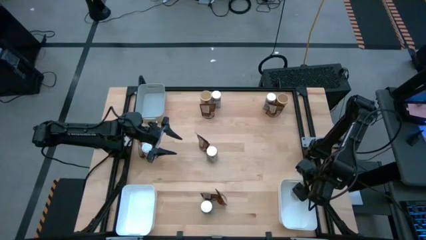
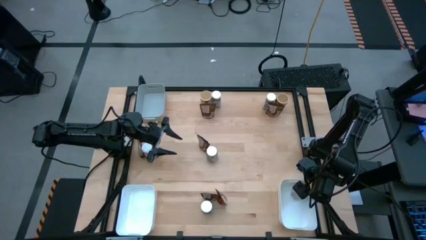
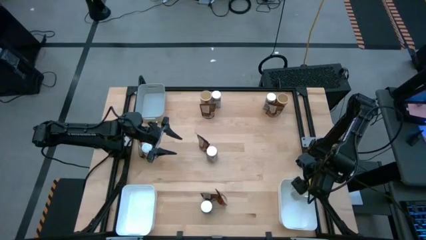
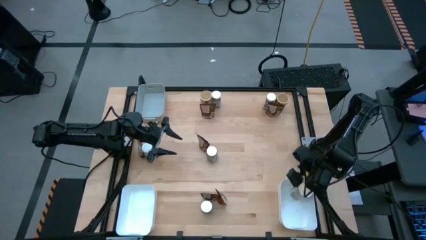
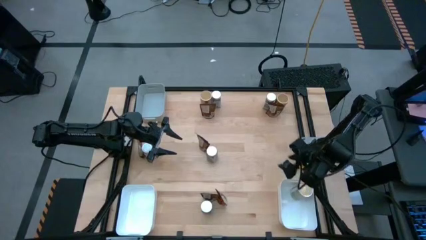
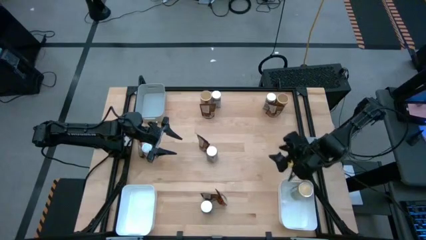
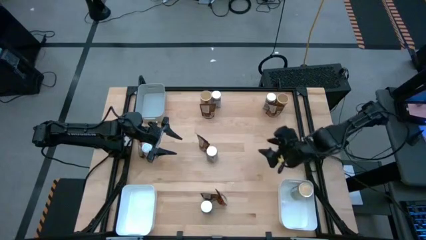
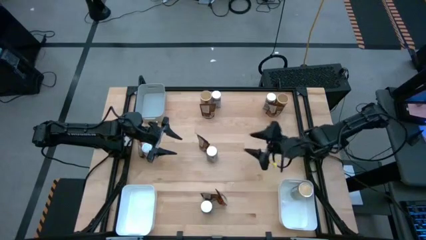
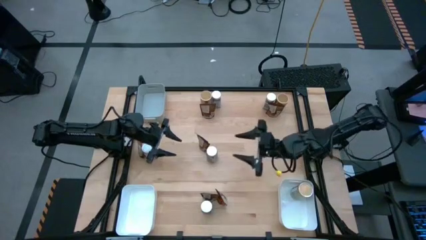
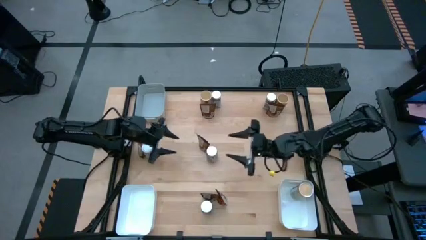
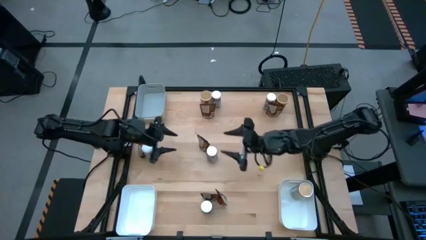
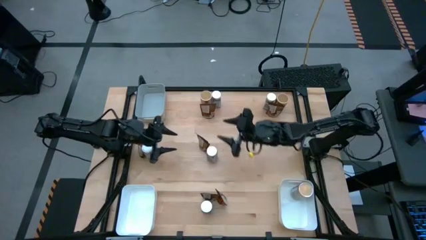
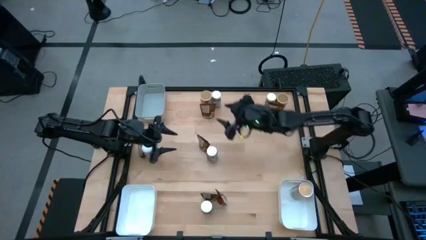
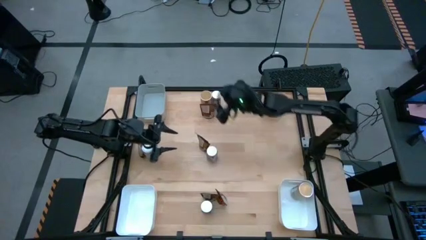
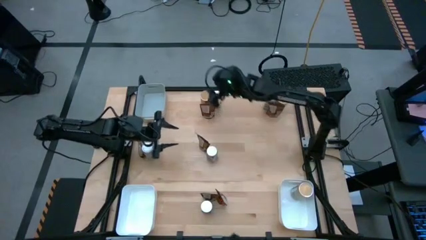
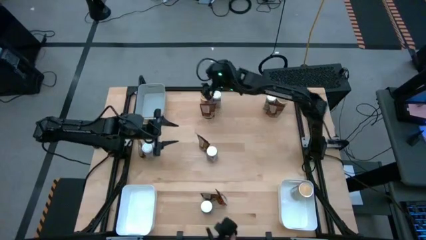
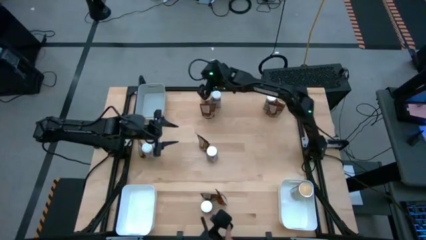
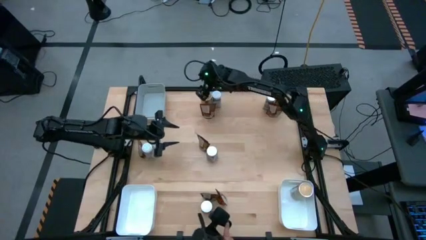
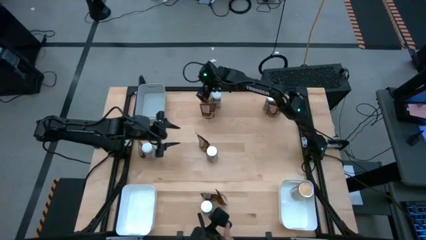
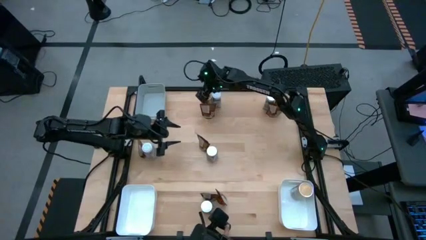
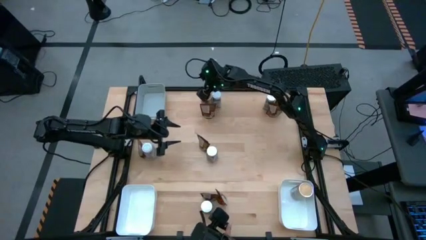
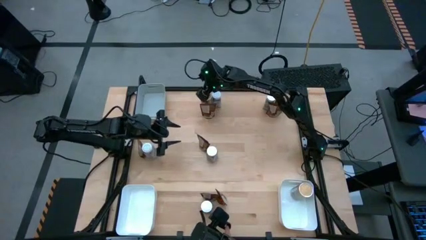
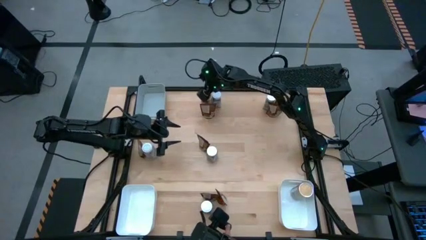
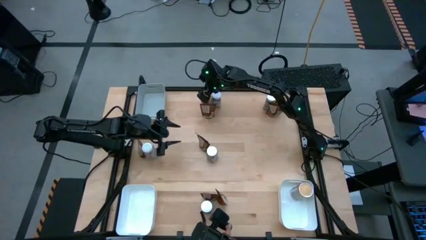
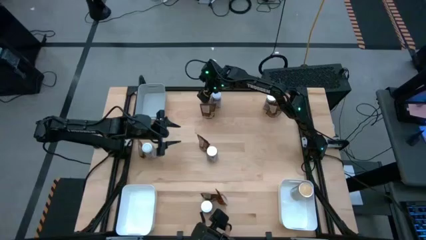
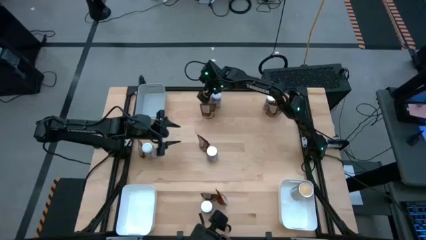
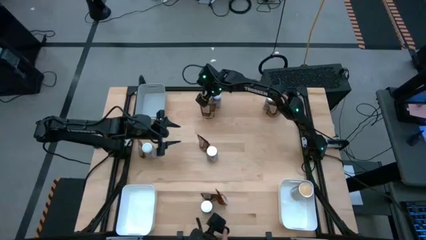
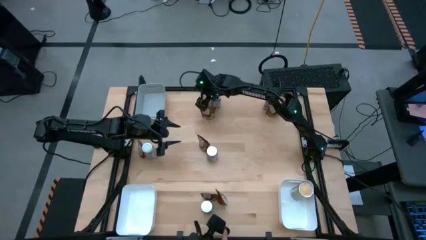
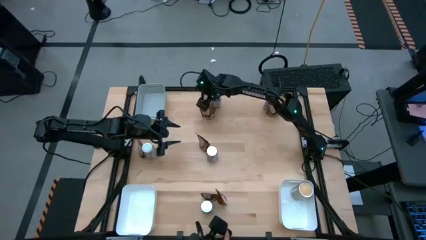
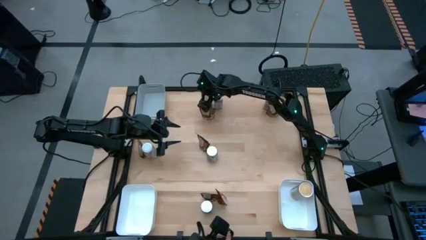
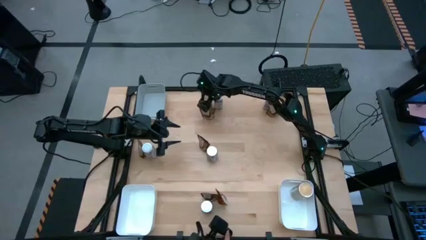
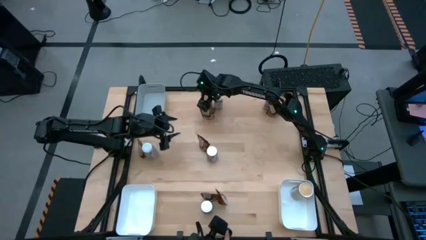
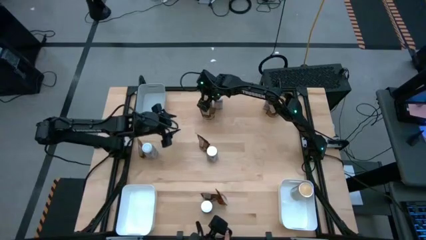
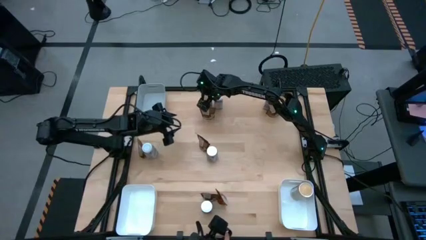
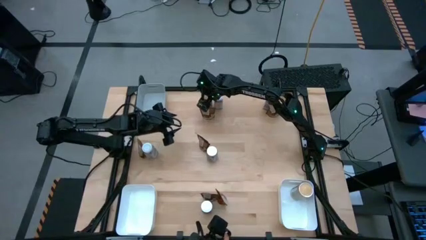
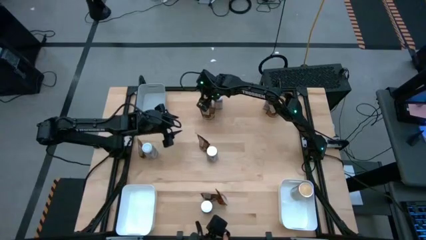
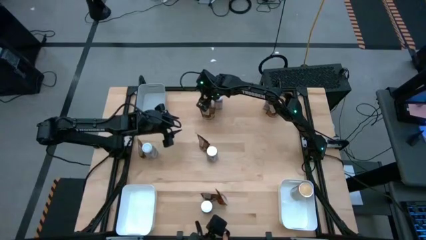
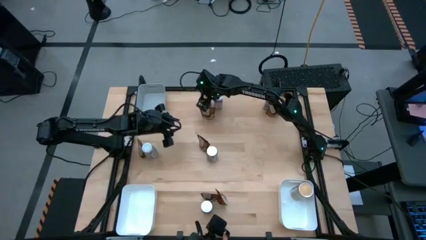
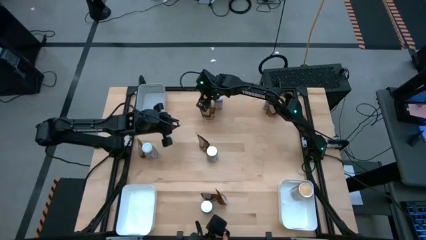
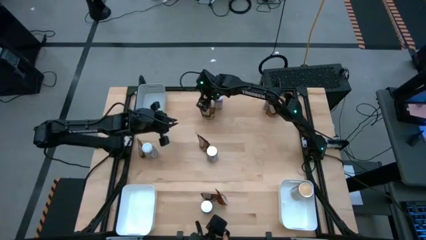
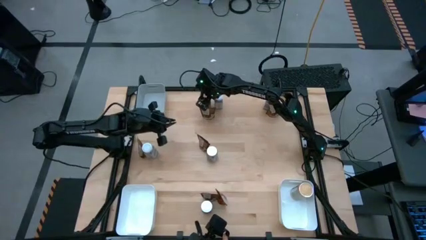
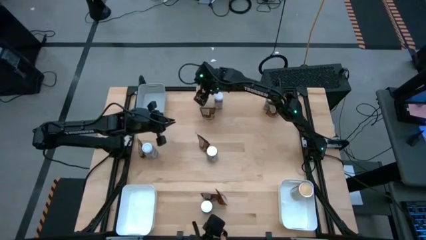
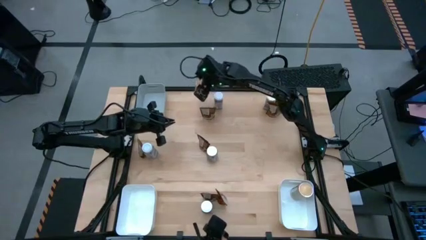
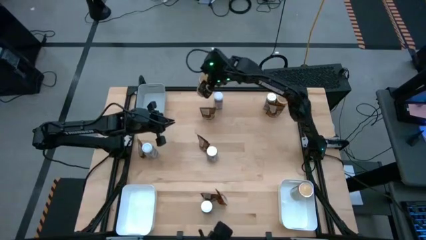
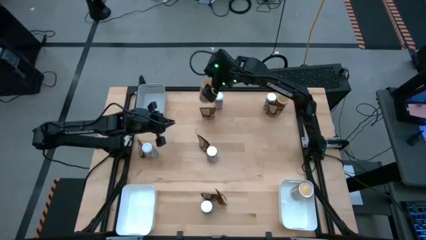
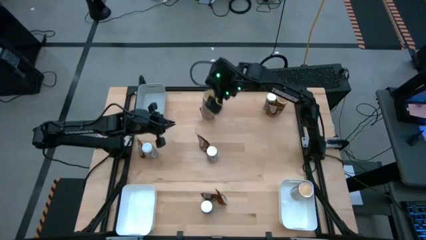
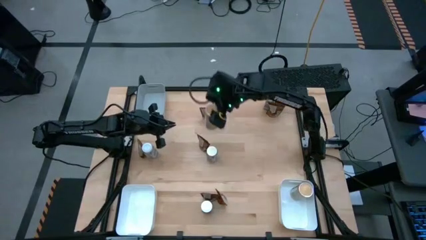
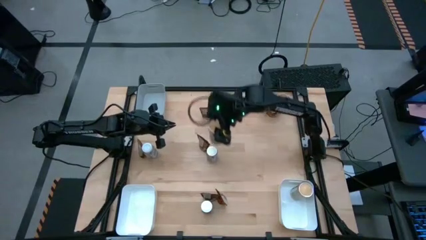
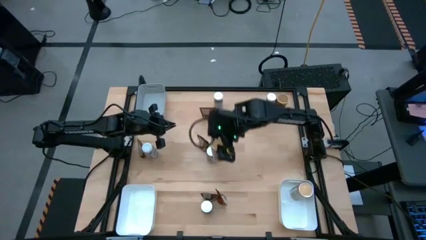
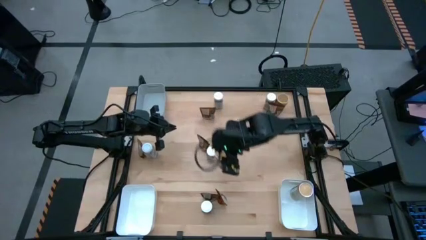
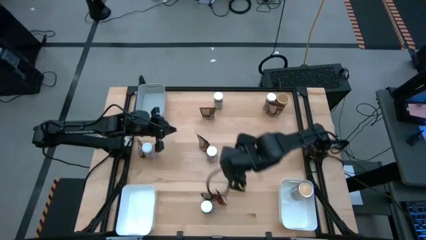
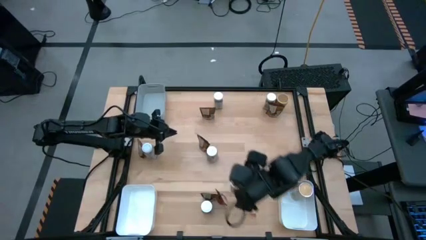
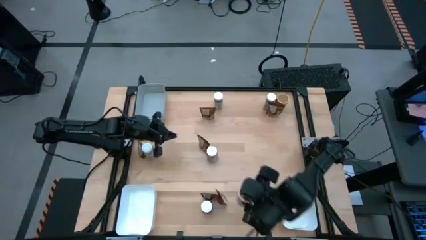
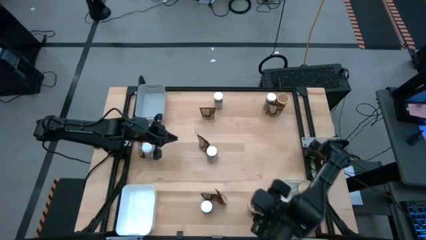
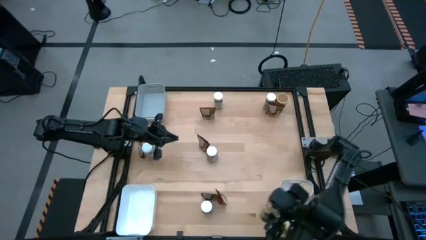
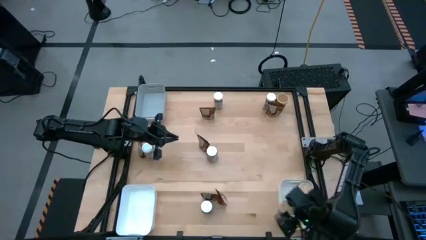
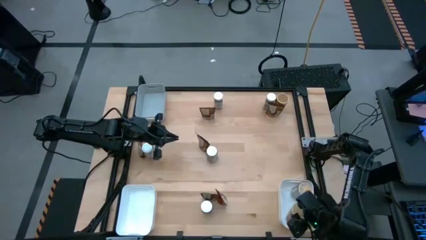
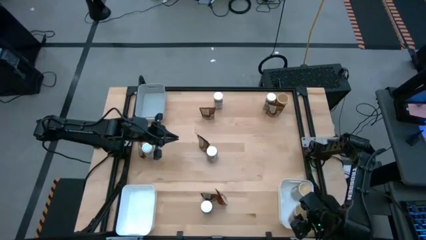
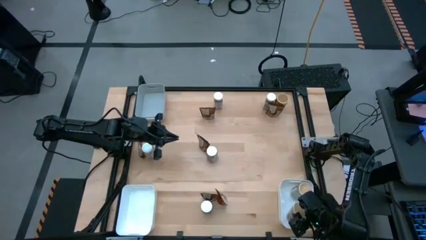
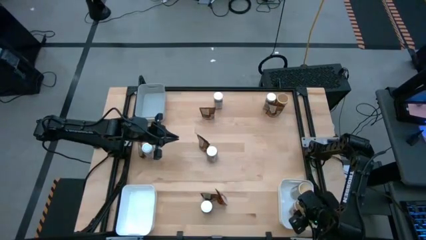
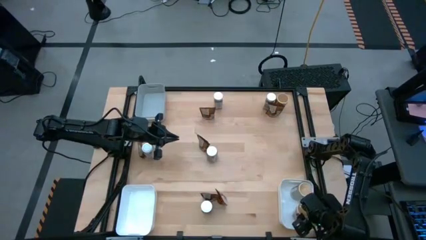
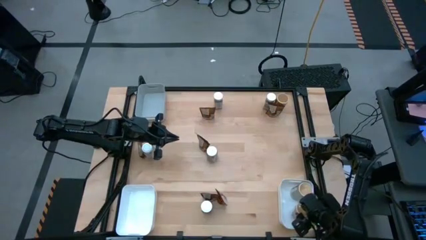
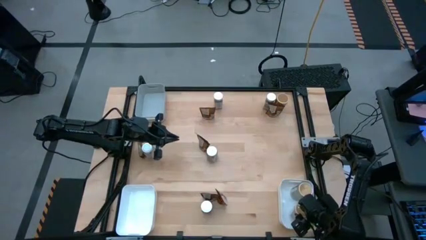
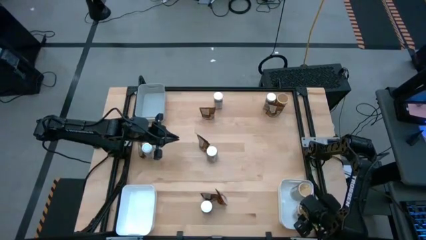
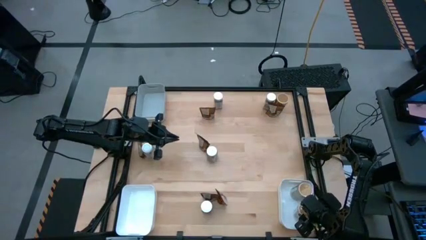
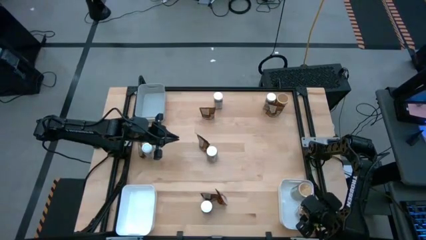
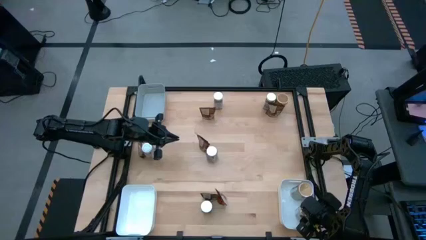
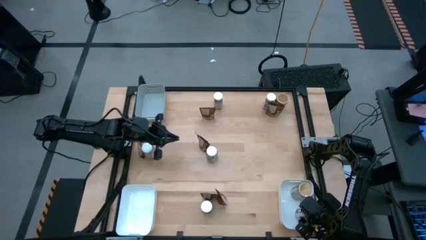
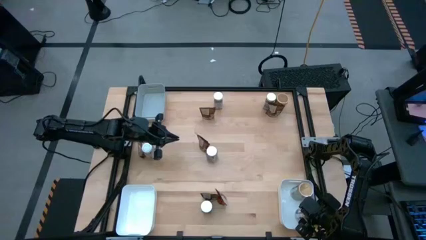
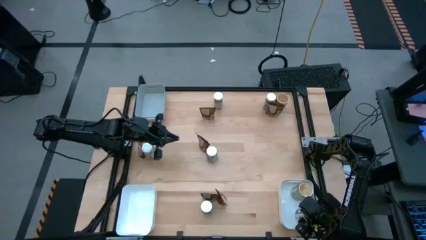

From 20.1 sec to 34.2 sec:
Task: Sort spices by type
Put the left brown seasoning bottle into the bottom right white bin
